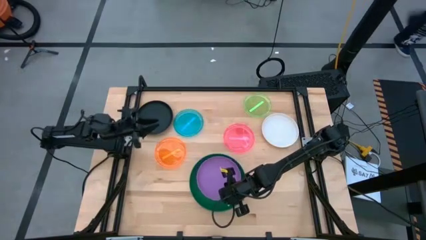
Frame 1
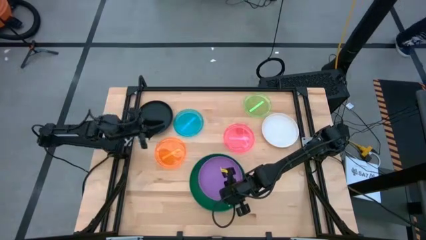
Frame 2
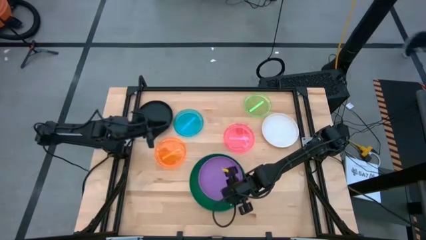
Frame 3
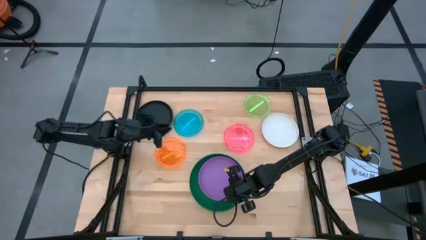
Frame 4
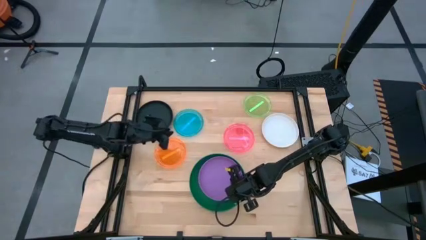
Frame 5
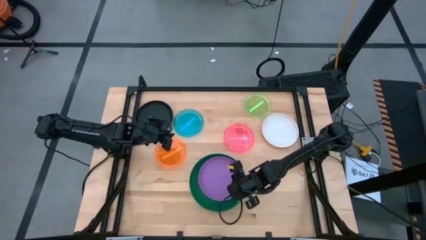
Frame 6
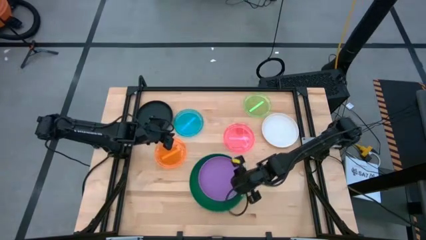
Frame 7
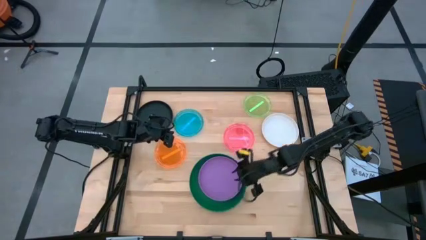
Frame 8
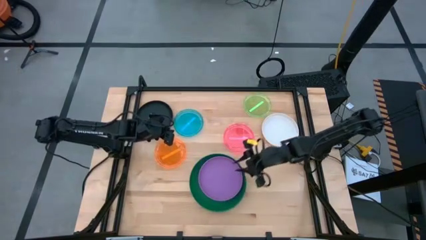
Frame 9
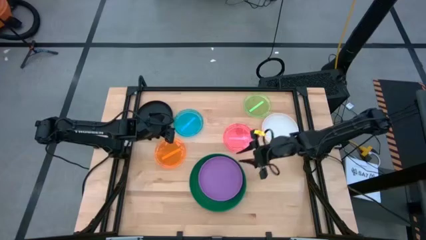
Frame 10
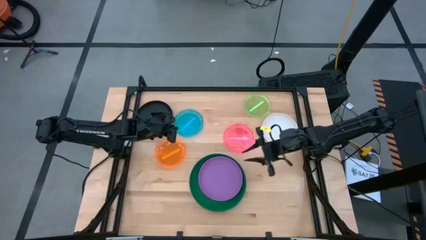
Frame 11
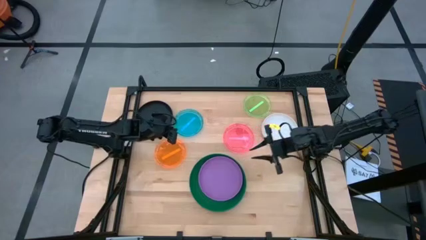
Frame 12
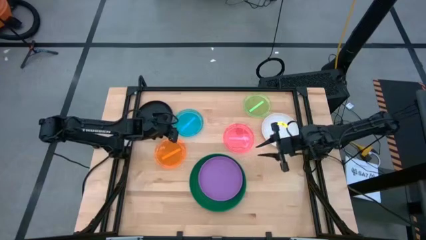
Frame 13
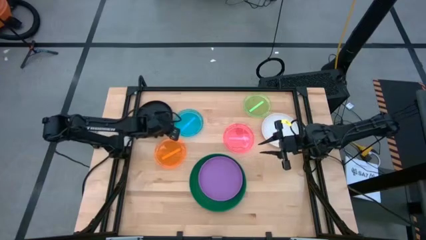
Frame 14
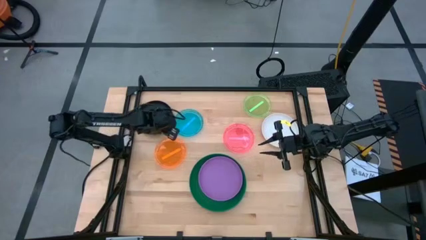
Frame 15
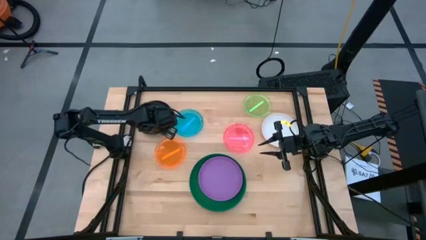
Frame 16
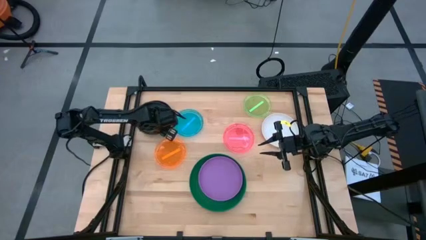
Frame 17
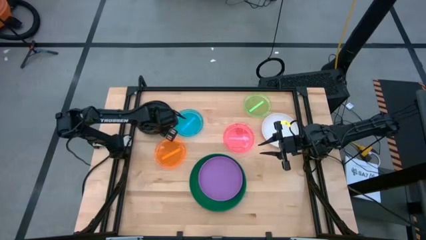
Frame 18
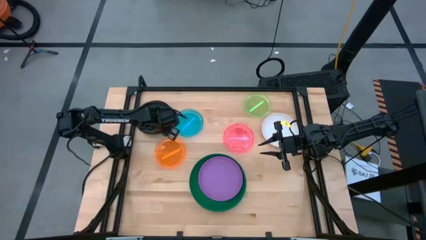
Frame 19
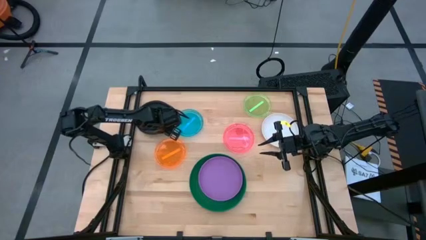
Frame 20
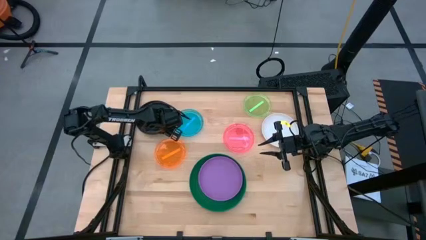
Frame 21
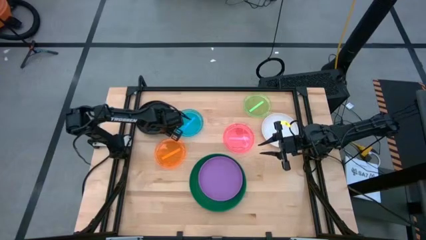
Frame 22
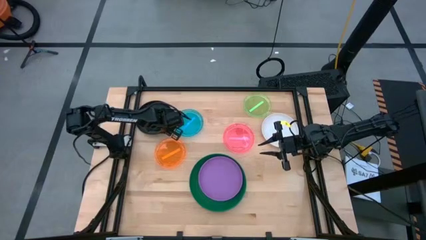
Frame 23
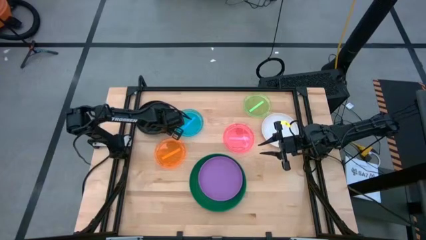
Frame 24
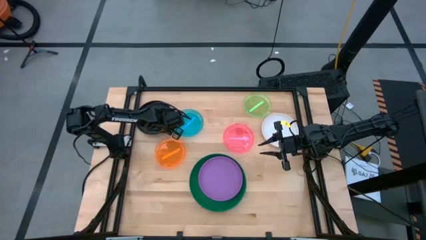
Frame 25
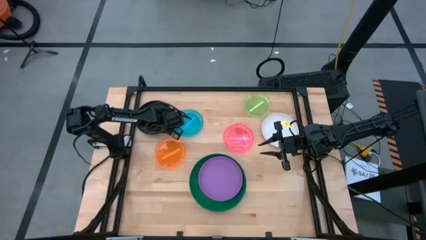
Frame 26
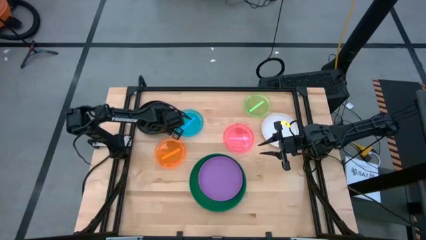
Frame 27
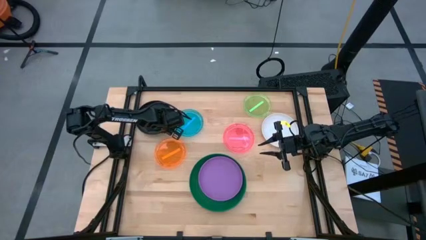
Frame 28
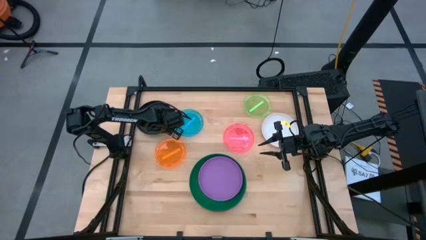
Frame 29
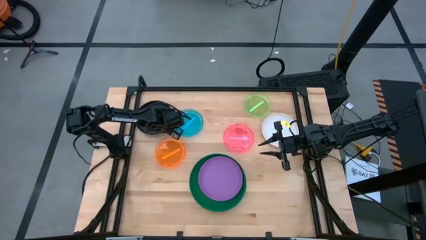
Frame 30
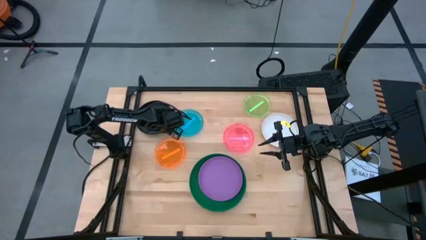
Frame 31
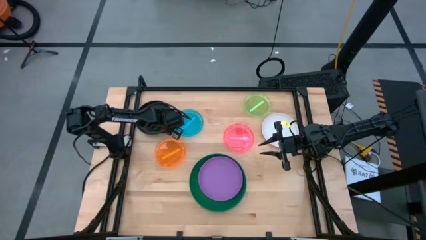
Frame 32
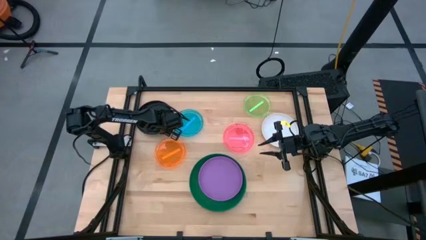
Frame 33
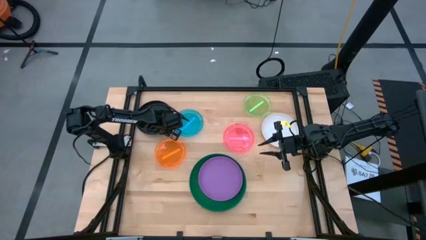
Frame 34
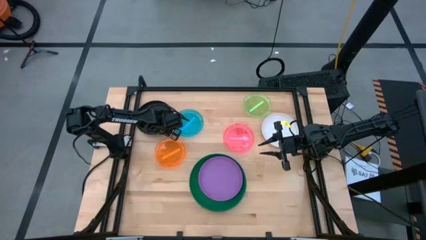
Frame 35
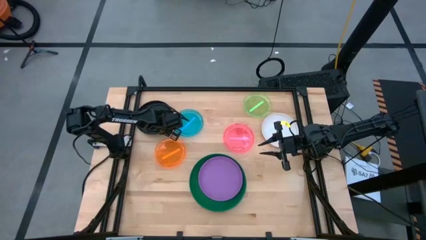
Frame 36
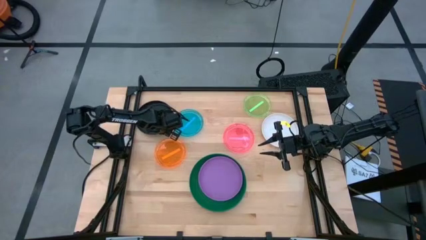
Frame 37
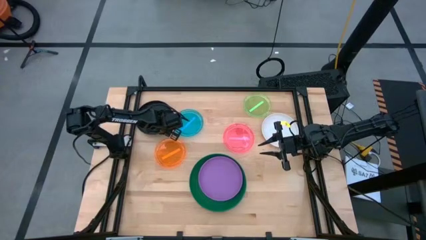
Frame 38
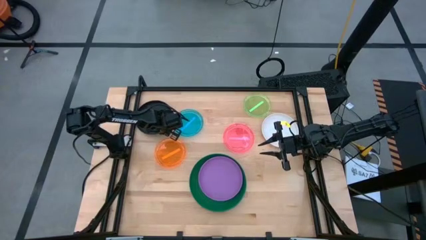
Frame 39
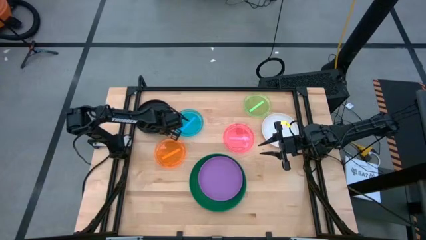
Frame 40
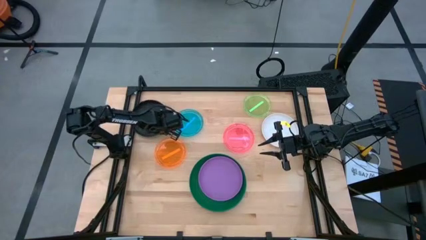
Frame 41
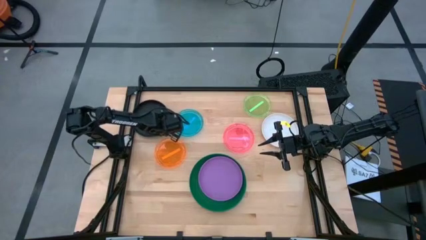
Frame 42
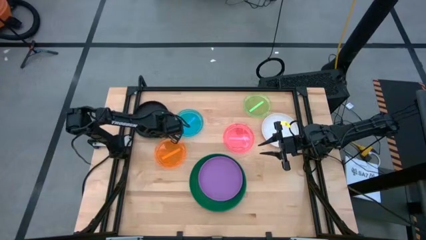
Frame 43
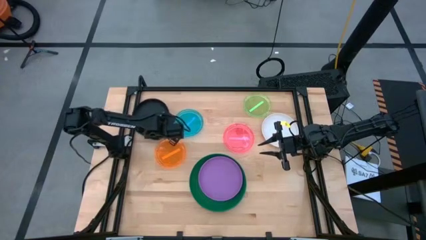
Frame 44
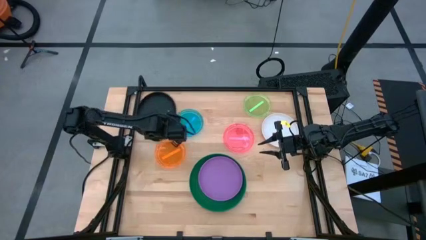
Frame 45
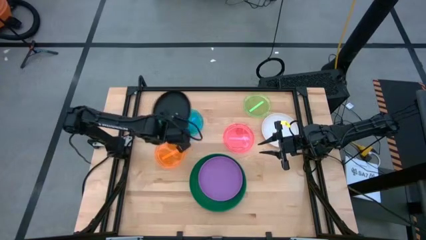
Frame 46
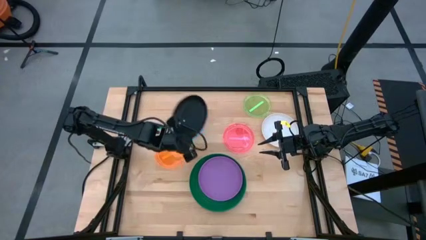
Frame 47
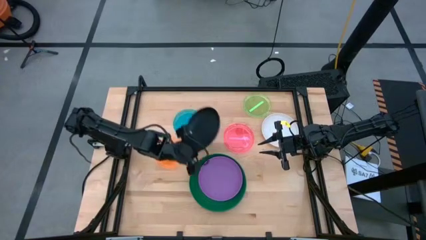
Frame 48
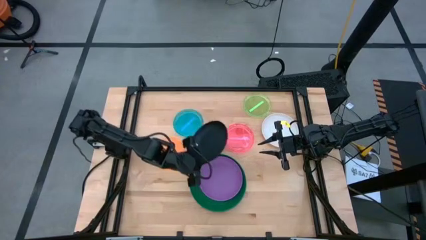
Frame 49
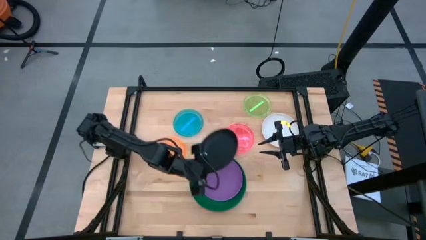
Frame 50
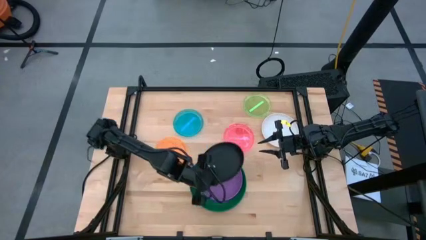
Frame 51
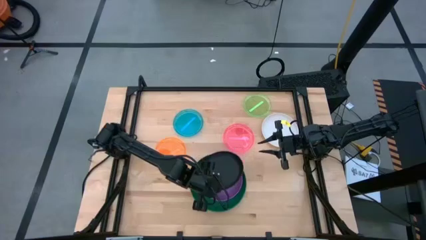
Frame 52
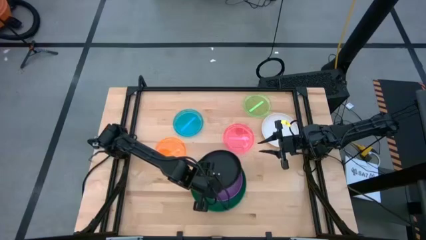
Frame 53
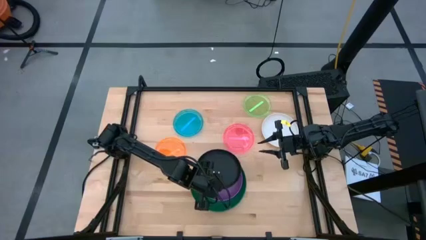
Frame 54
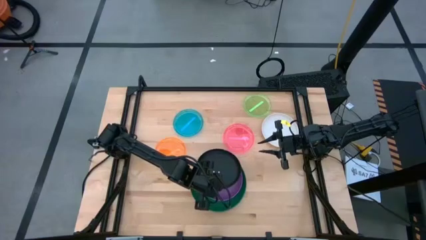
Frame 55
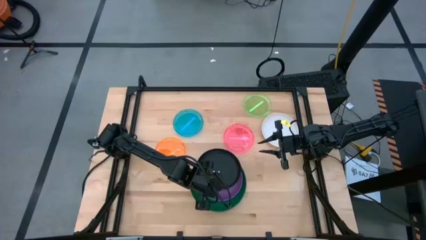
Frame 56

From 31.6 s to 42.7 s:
Task: Stack plastic plates
Stack the black plate on top of the purple plate

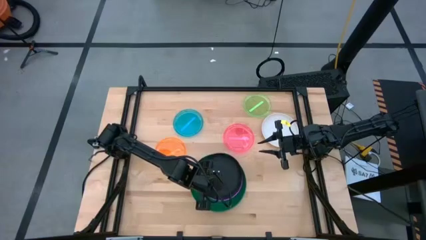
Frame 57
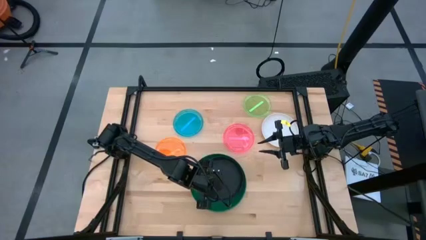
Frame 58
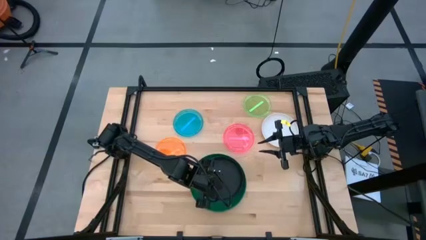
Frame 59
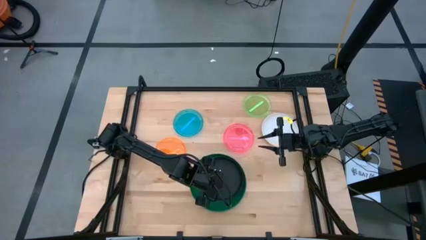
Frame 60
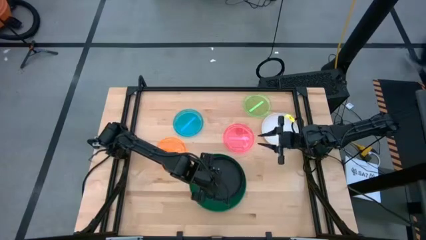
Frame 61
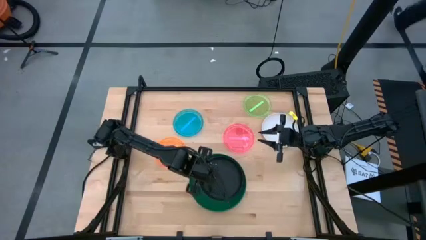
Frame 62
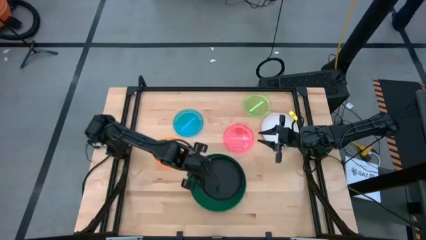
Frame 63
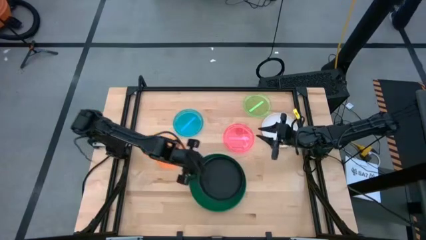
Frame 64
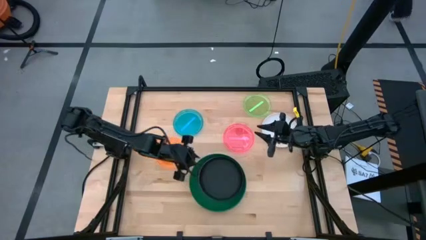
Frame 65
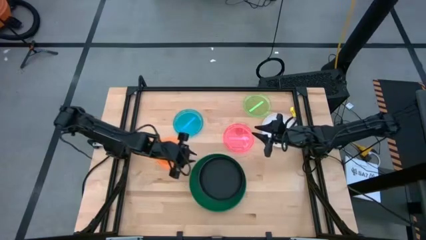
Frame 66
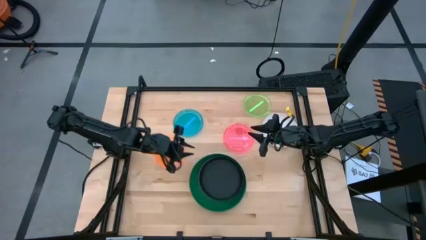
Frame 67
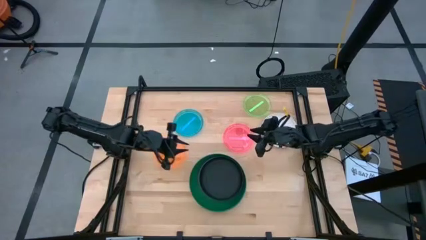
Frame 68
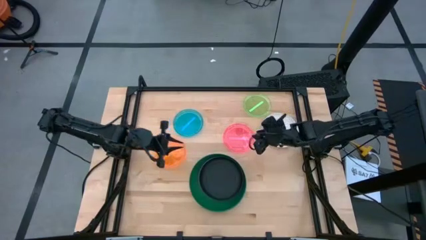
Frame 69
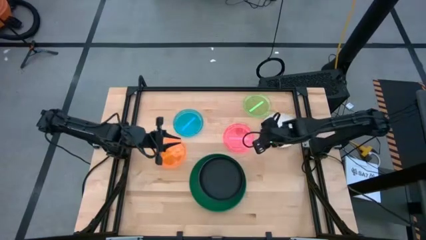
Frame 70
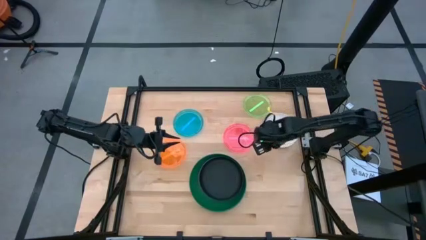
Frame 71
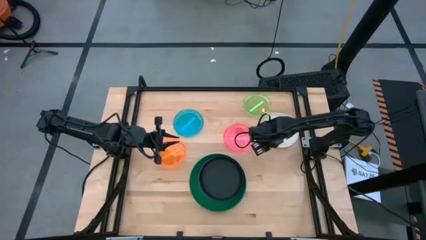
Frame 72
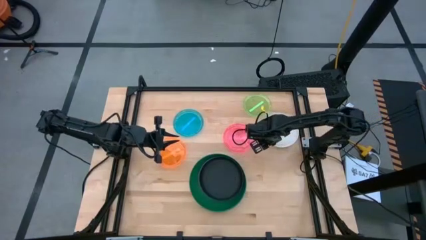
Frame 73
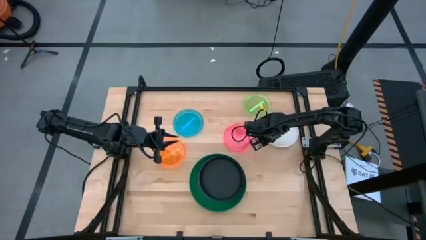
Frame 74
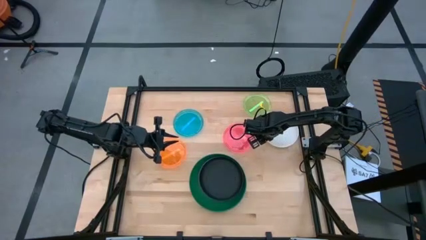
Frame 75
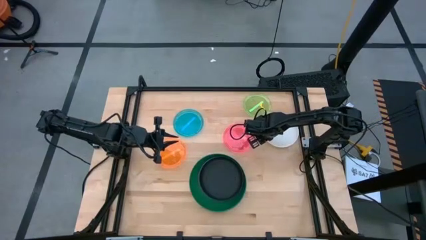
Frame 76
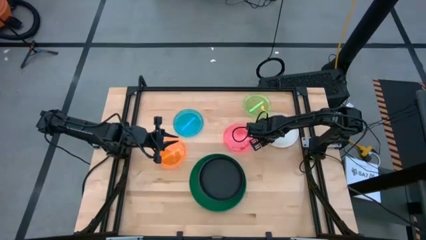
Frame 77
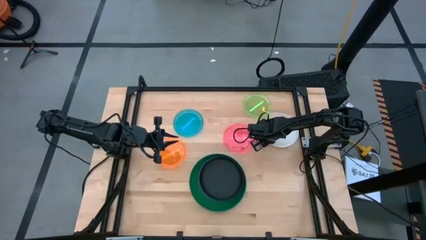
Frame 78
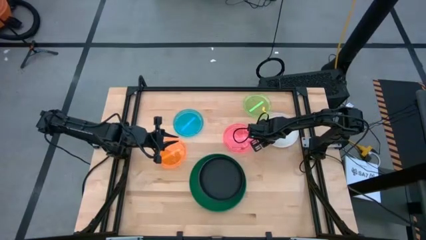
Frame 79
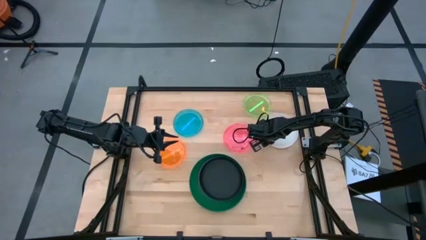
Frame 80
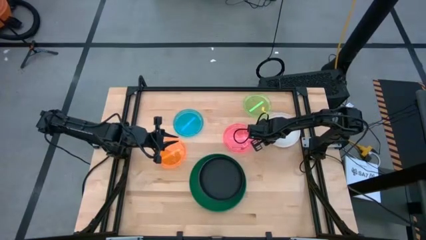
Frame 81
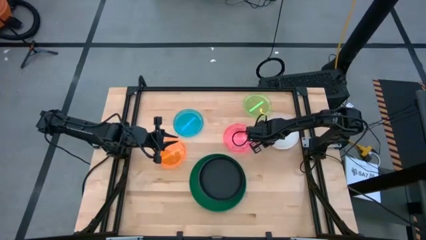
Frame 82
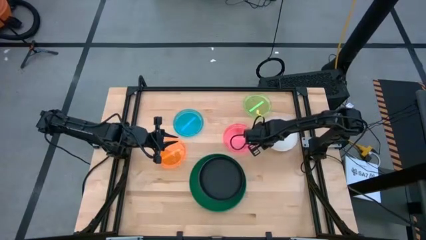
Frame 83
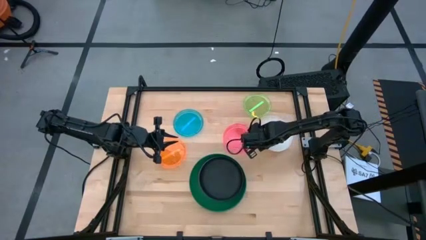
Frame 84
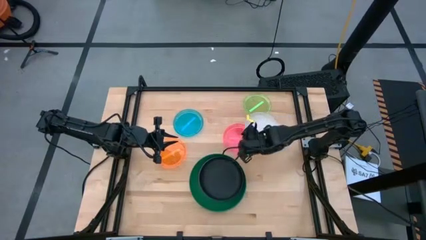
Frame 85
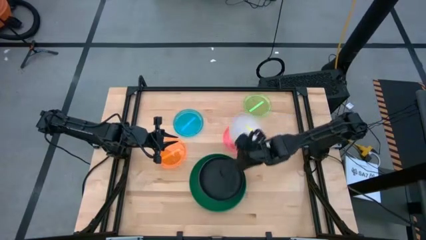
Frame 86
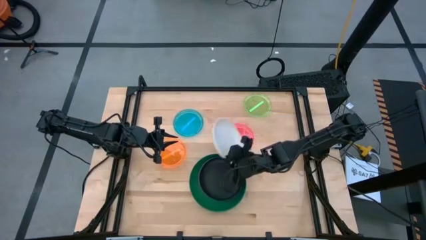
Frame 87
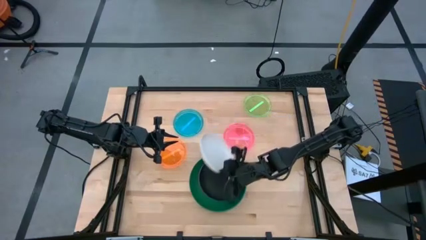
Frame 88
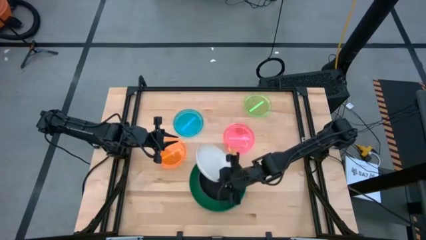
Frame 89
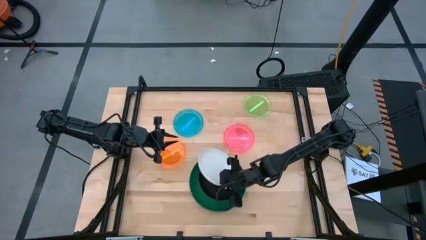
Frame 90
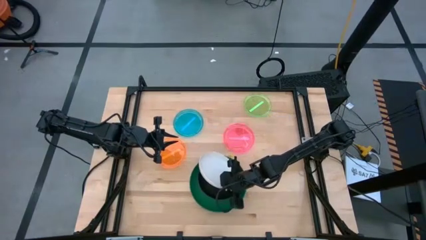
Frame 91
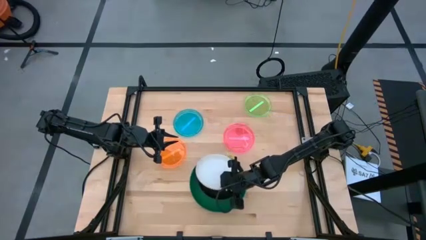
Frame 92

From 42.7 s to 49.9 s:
Stack the white plate on top of the black plate
